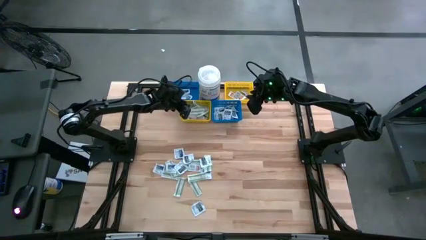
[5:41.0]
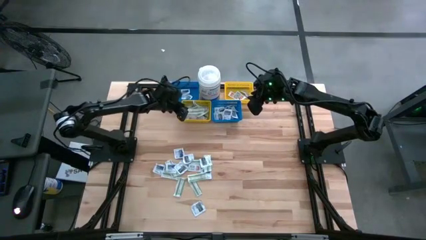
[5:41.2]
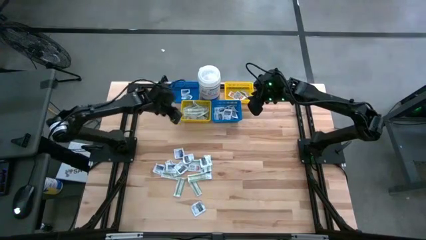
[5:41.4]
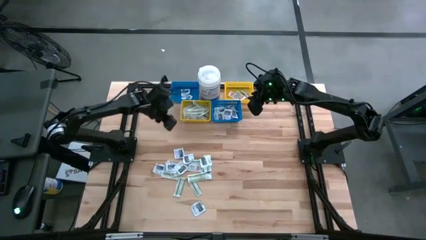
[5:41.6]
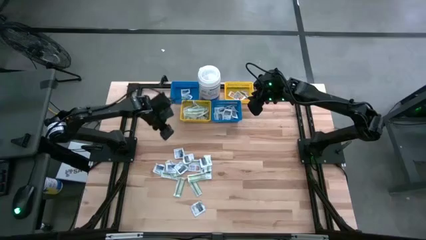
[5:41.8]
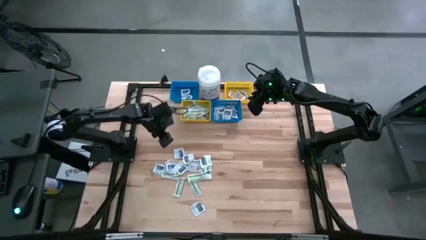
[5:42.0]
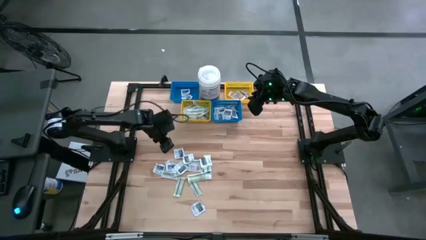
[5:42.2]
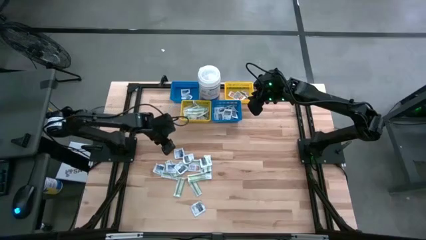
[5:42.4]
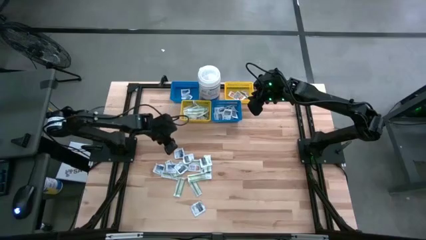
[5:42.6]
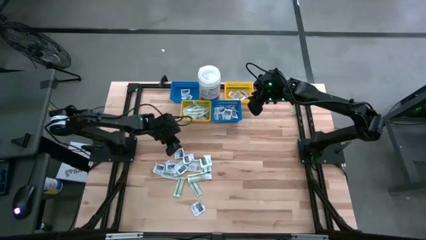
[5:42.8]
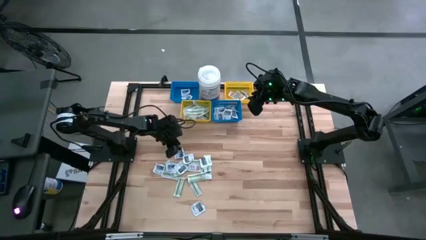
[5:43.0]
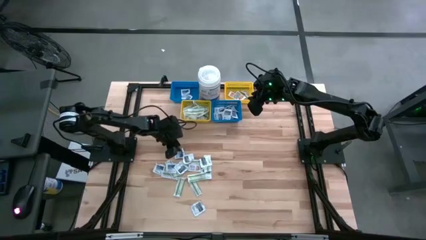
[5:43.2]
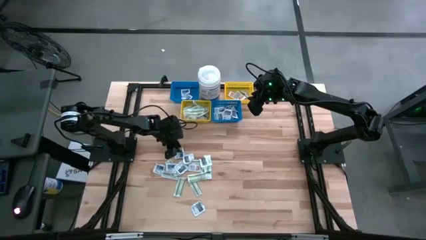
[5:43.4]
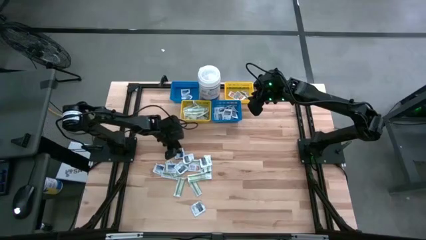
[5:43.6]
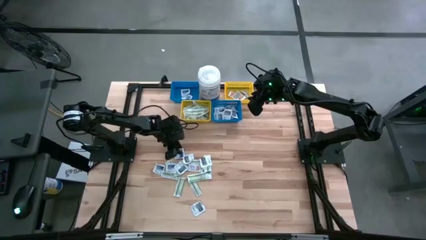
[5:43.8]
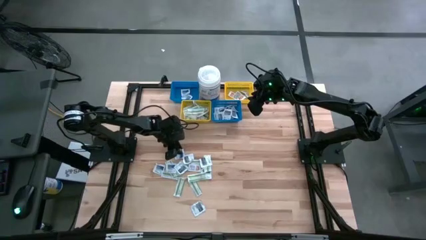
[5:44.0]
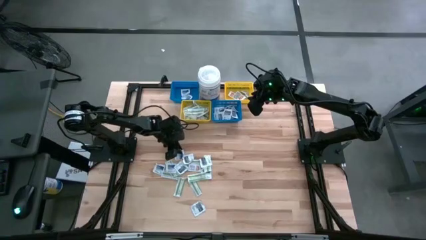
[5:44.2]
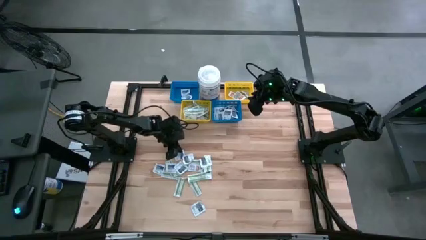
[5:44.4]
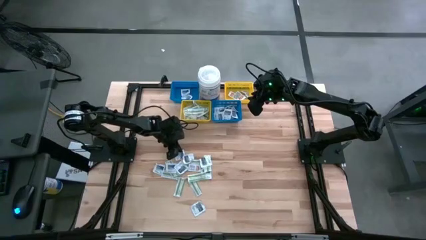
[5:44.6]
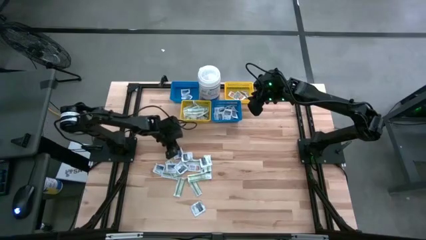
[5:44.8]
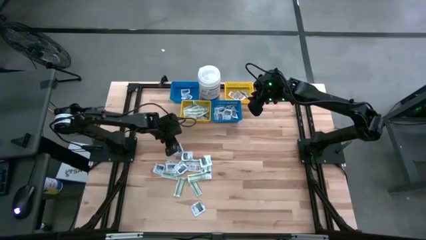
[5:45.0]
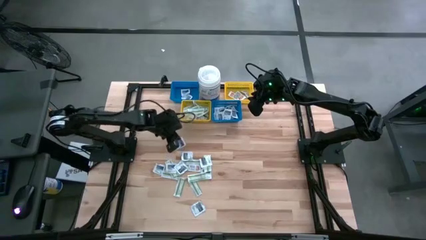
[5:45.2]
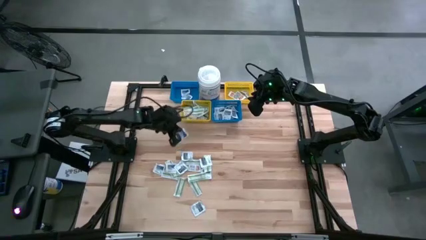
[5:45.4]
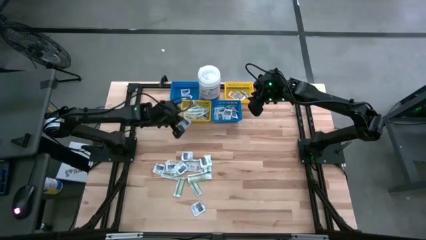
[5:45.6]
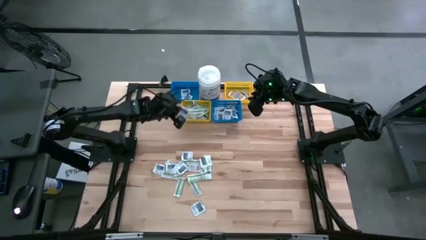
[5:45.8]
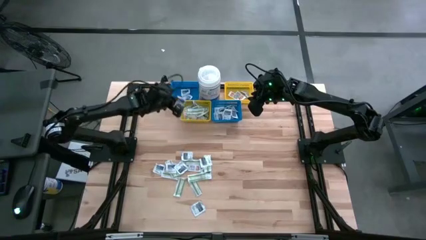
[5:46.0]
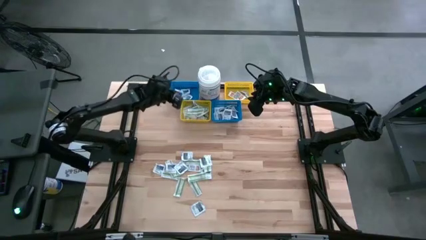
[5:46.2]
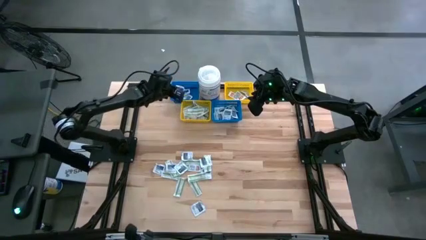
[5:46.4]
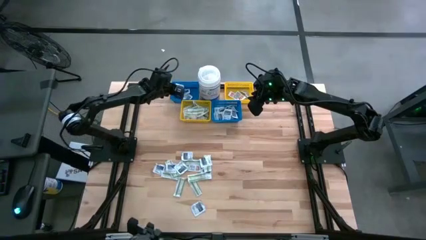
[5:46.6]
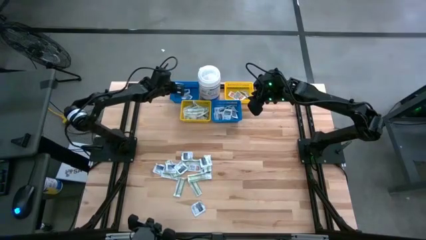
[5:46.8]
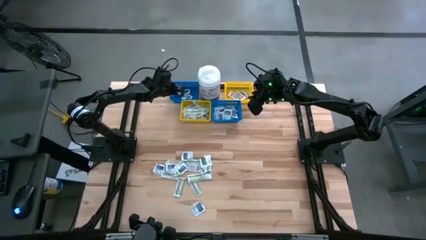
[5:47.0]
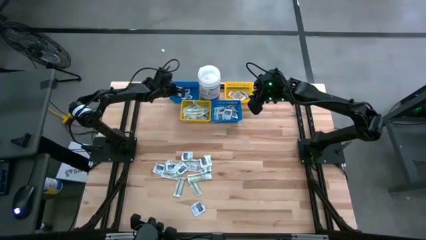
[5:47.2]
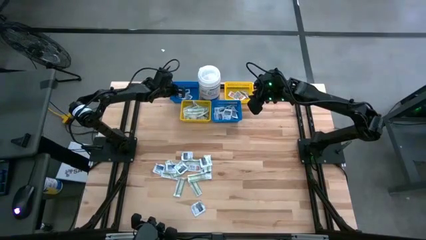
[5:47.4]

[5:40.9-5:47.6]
Task: Pick & Place First Aid Supplies
Put the blue alcohol pad into the left blue bin

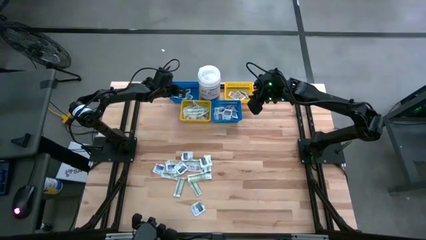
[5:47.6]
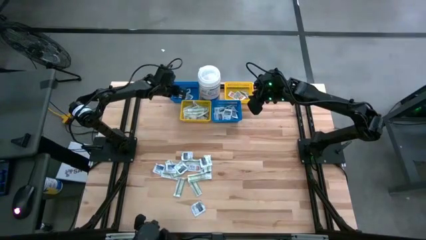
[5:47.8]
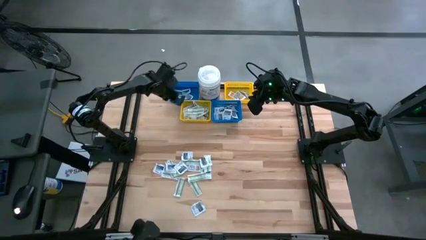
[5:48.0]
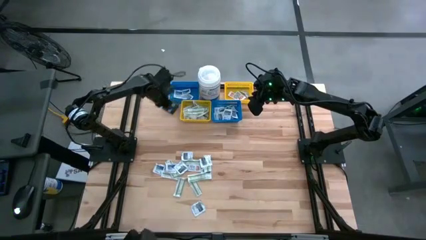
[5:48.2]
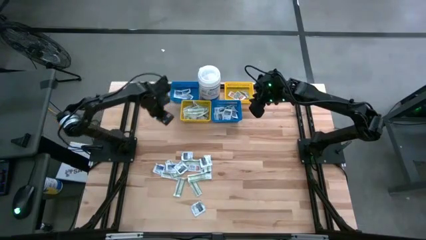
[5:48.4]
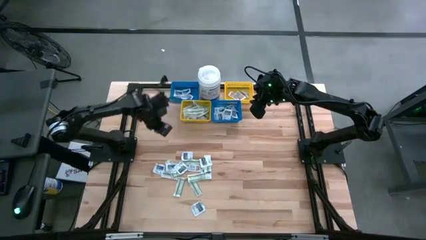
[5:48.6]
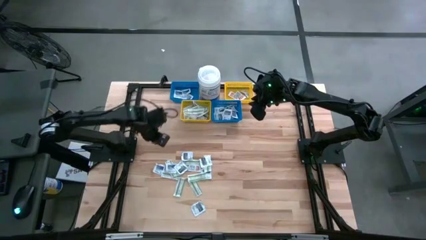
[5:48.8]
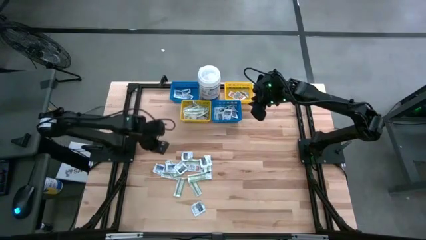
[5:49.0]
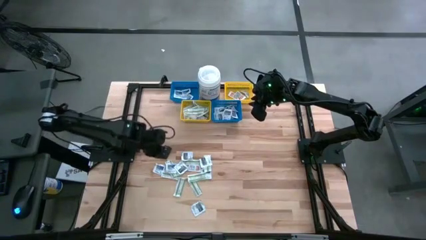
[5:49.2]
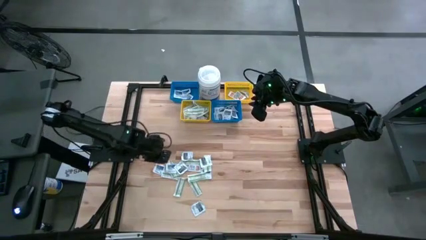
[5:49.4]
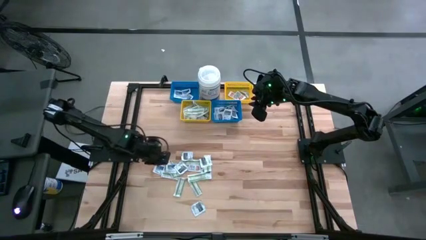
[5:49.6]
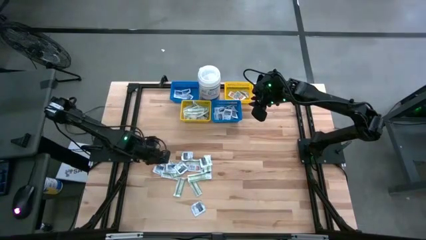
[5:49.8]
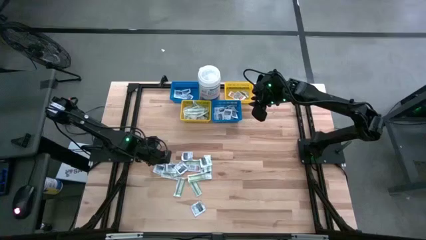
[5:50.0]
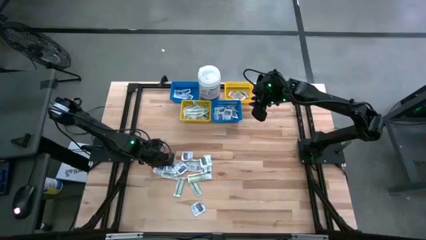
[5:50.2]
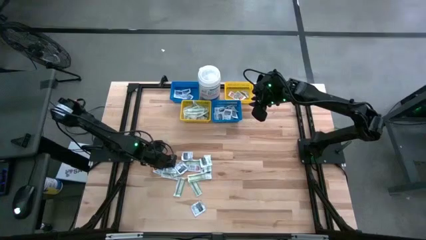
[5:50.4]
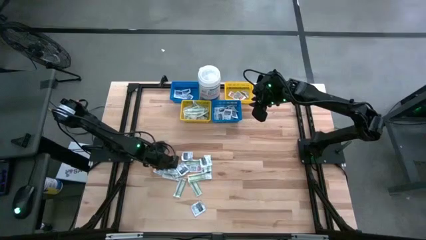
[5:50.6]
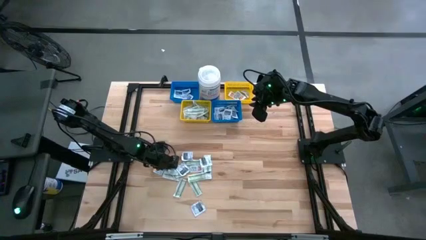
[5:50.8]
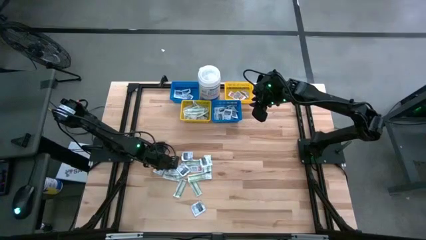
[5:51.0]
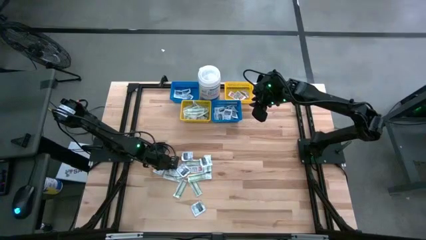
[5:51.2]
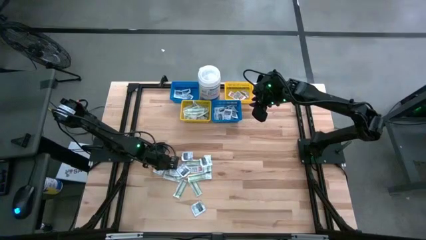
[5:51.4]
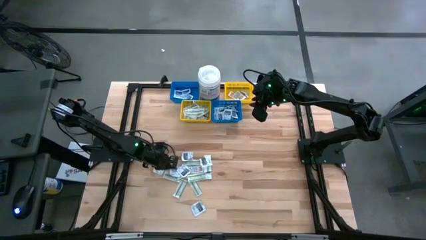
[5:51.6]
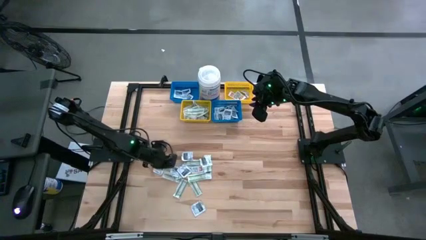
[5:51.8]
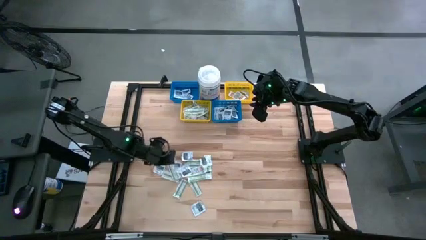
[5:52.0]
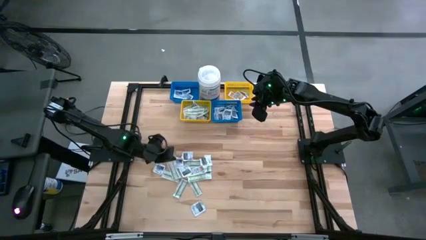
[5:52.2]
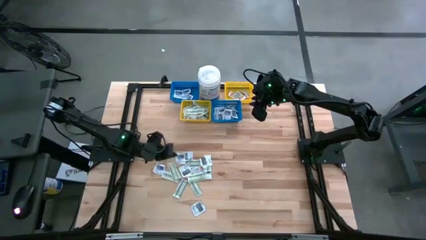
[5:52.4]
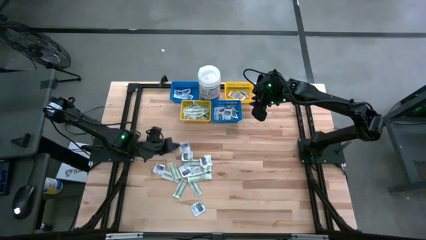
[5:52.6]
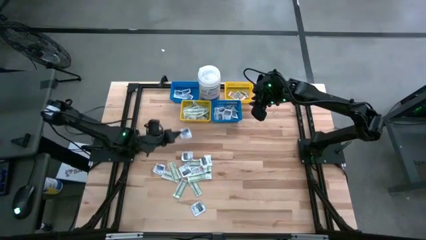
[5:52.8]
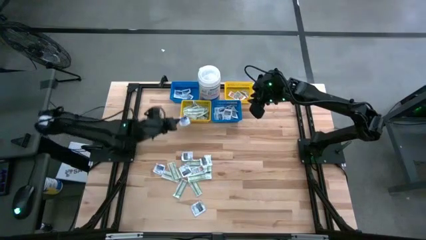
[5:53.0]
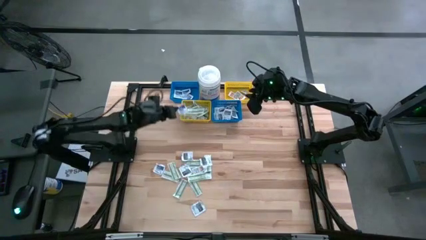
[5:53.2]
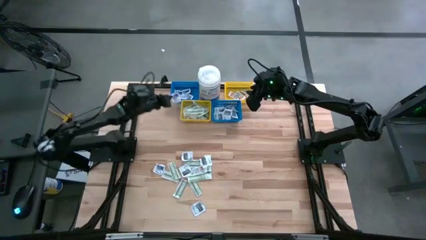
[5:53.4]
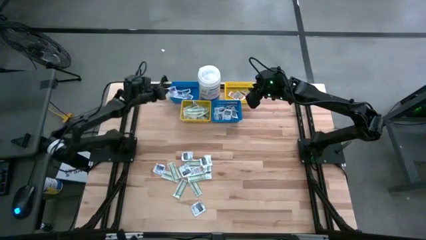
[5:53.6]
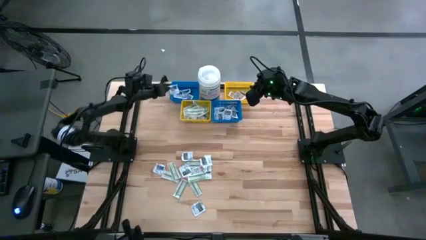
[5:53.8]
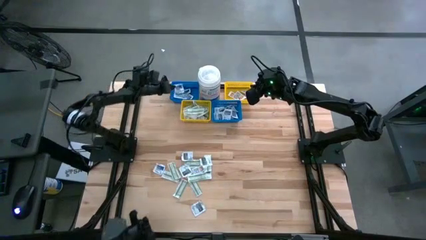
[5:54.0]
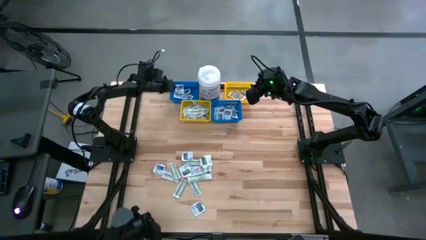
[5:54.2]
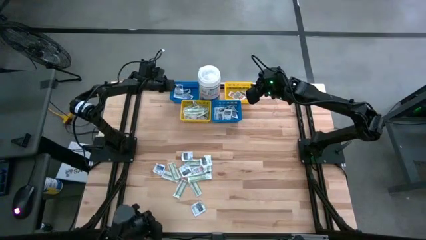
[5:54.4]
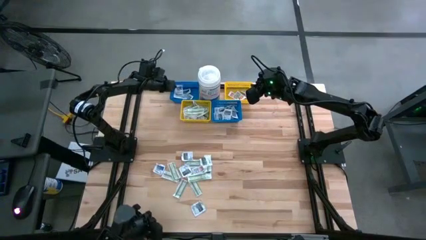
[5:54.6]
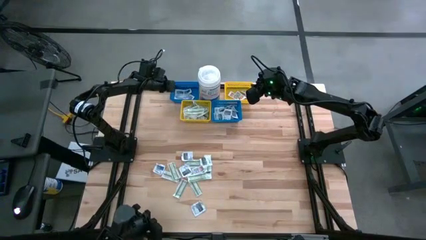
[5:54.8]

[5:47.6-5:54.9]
Put the blue alcohol pad into the left blue bin

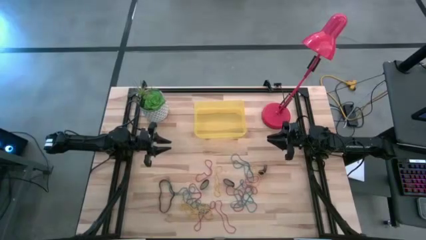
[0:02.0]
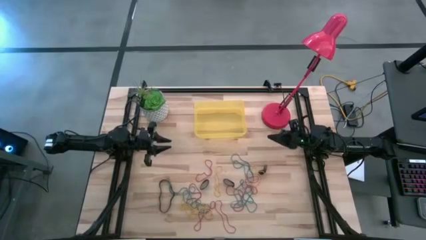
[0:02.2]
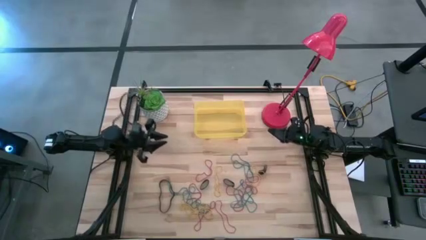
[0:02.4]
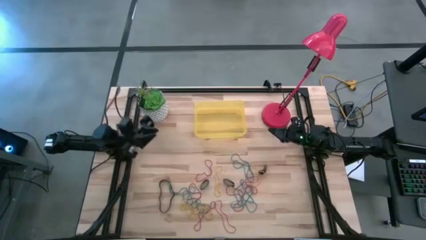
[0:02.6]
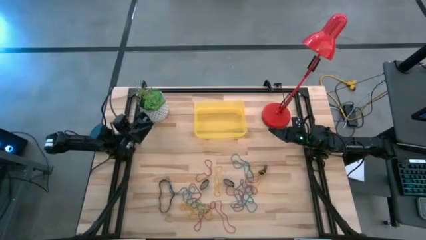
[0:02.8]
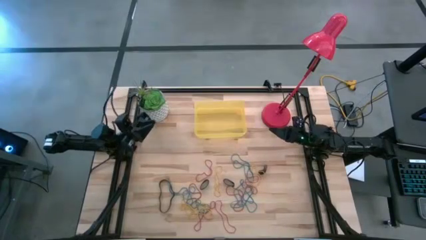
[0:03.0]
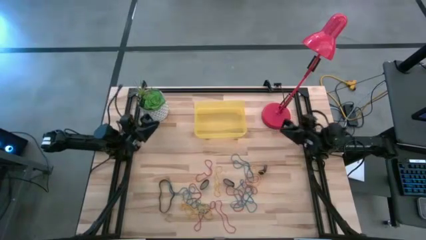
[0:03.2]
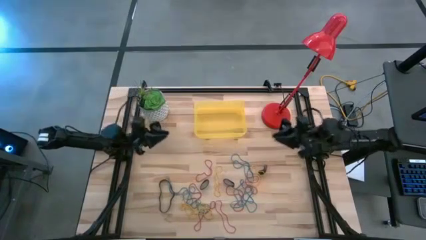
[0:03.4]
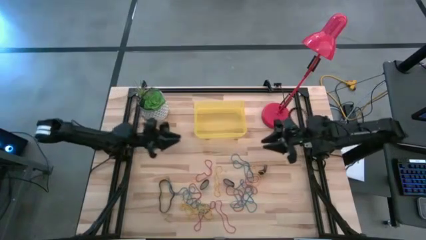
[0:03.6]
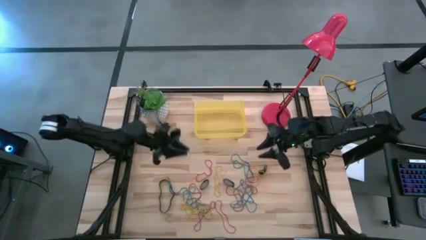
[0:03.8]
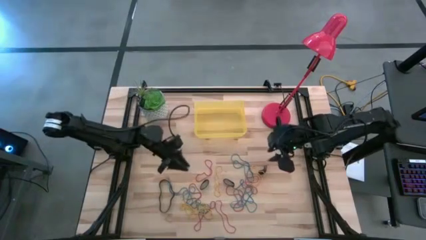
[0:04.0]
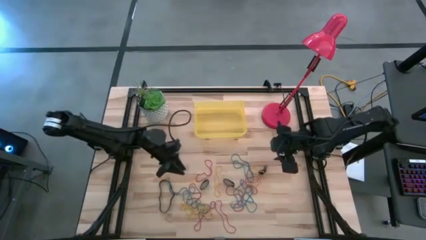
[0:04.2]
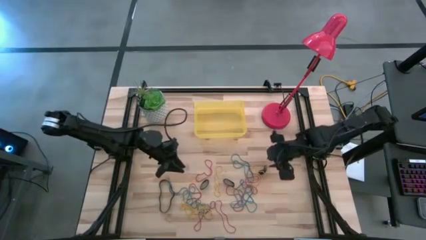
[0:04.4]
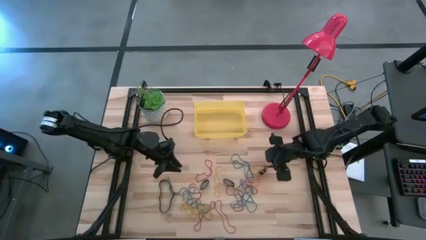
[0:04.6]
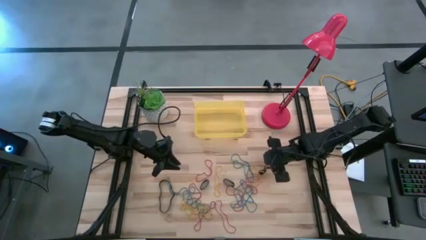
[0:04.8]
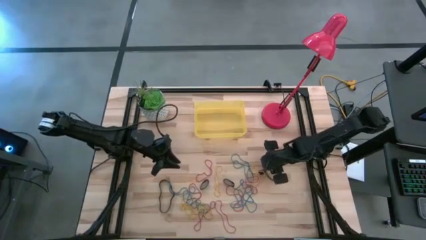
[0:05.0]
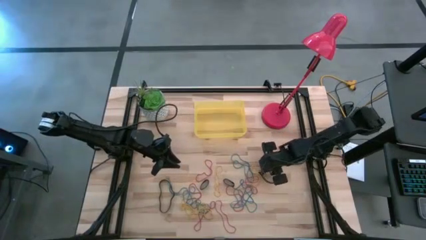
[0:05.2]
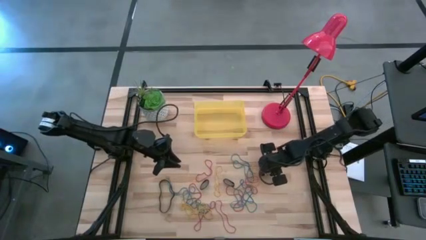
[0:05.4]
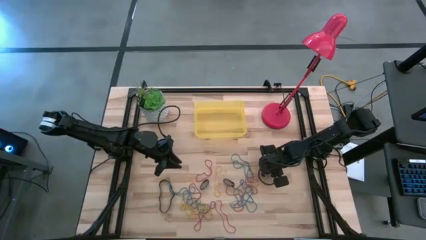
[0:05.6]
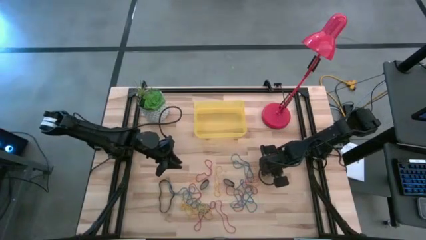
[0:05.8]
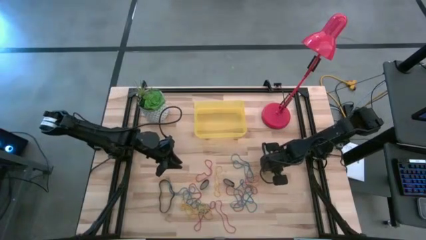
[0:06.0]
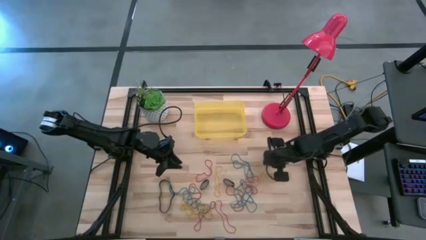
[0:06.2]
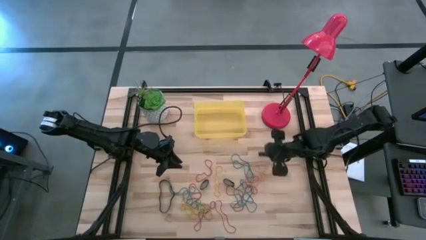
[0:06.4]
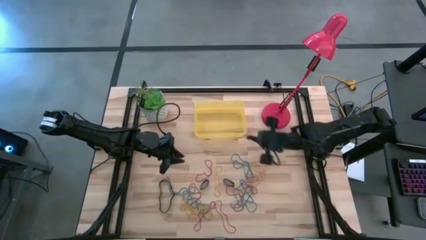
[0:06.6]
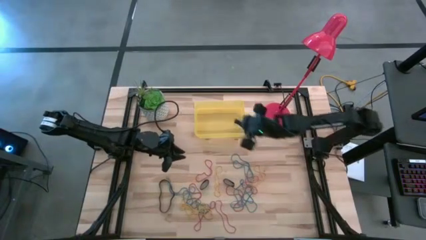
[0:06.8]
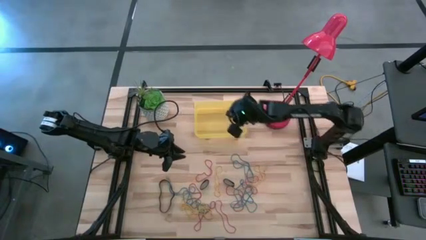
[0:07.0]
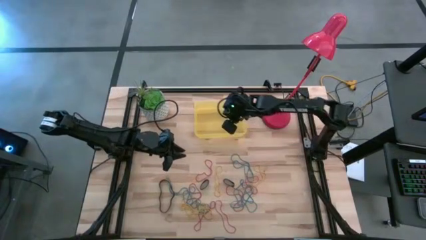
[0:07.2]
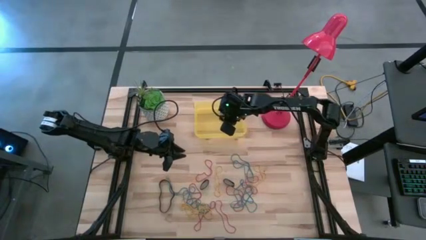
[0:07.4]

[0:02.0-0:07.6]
Task: Pick and place rubber bands into bin
Put the black rubber band into the yellow bin
